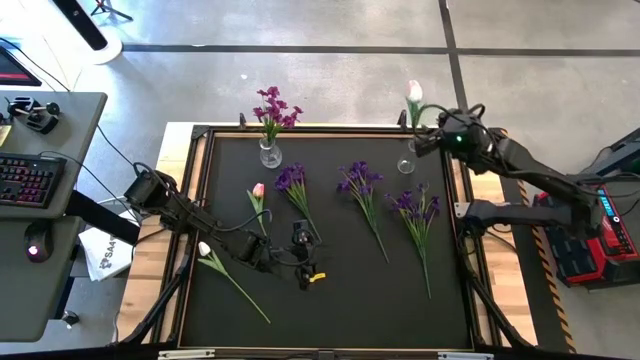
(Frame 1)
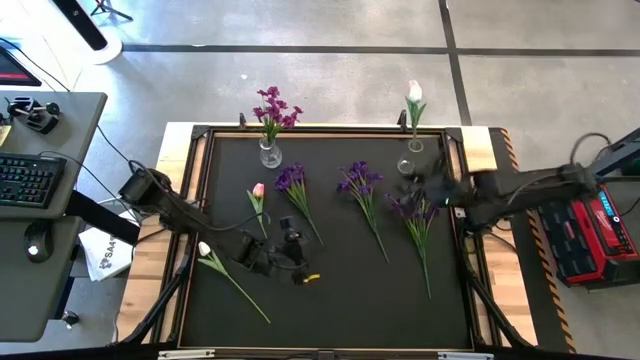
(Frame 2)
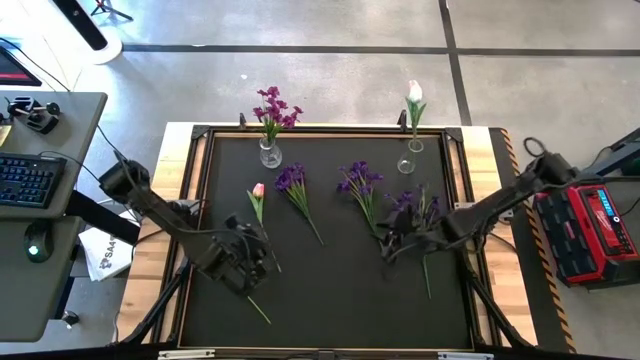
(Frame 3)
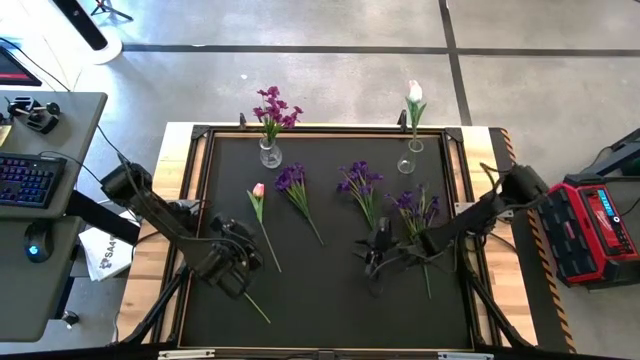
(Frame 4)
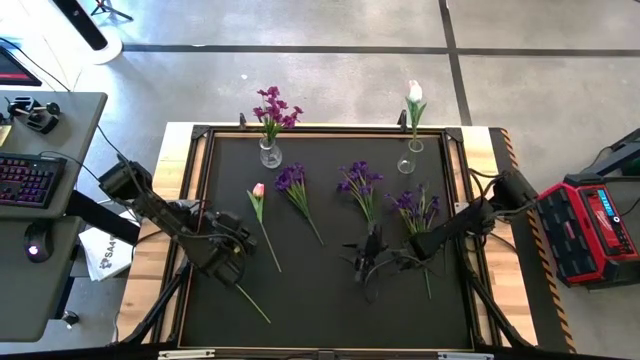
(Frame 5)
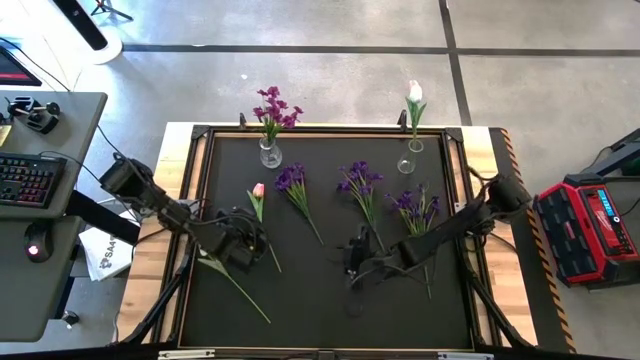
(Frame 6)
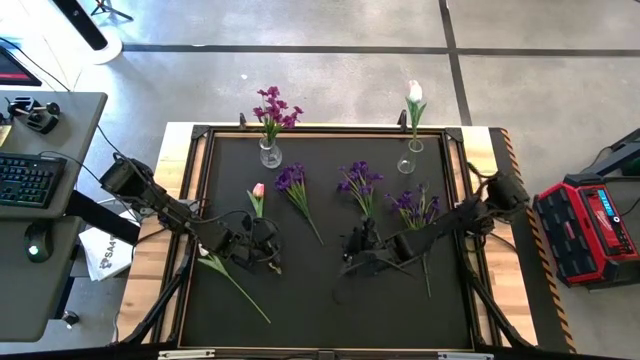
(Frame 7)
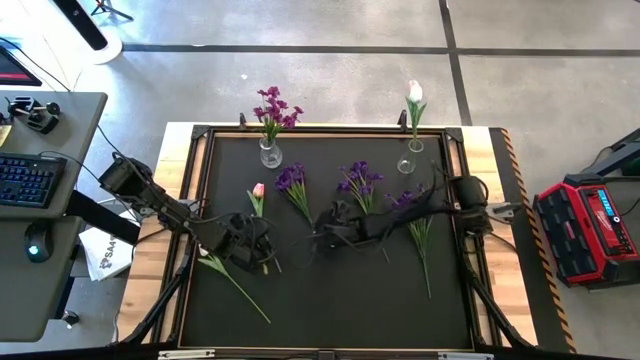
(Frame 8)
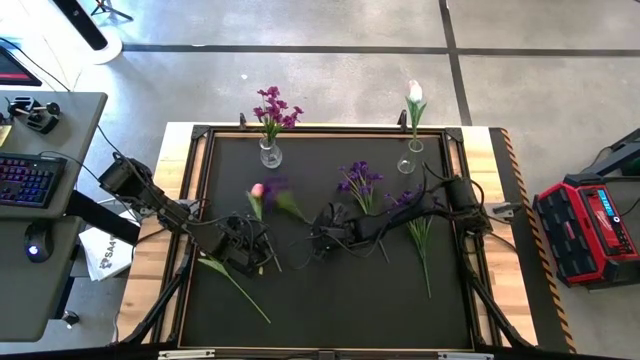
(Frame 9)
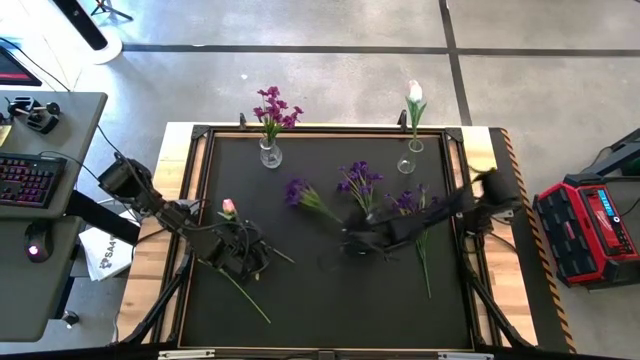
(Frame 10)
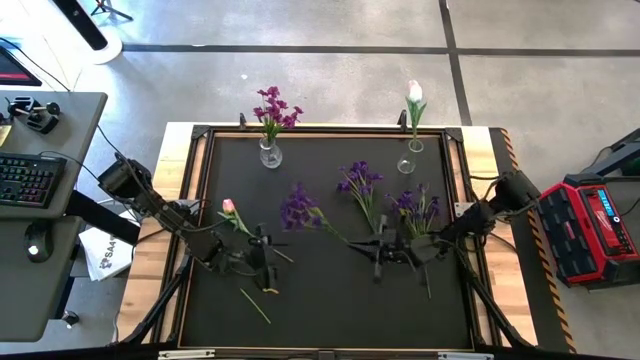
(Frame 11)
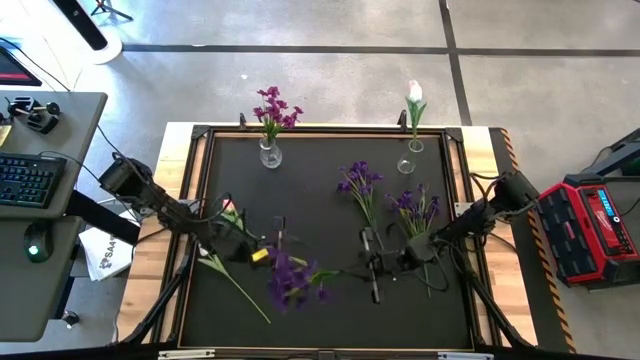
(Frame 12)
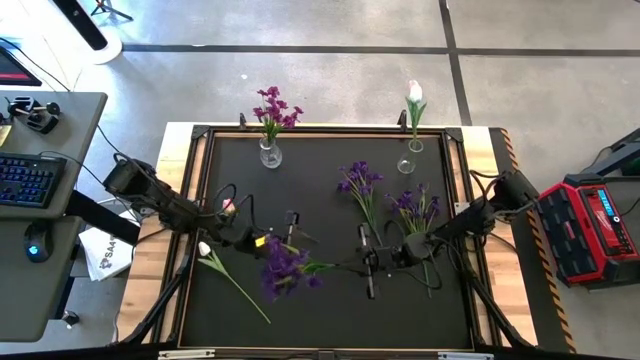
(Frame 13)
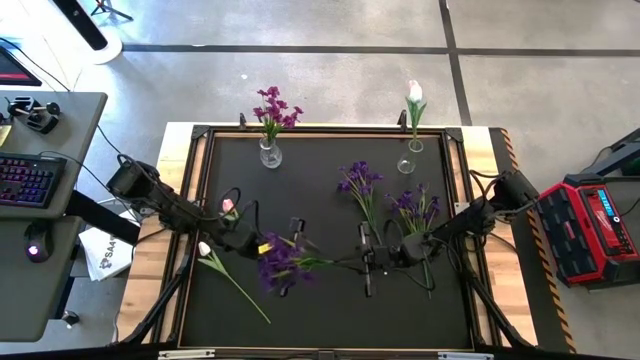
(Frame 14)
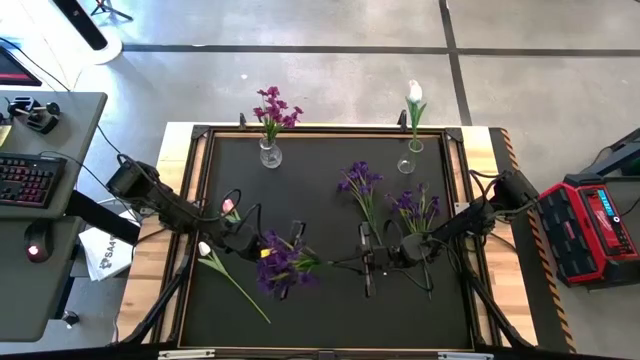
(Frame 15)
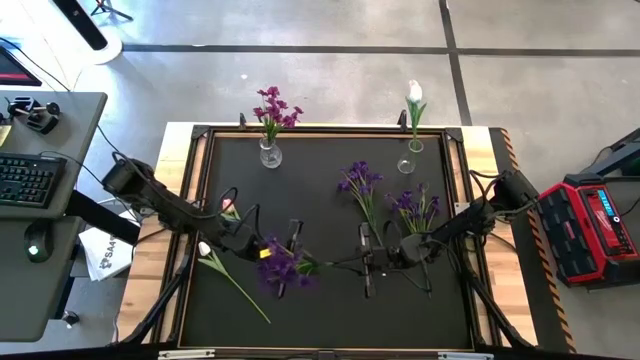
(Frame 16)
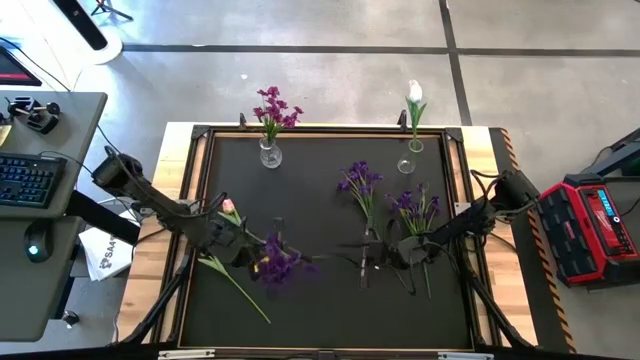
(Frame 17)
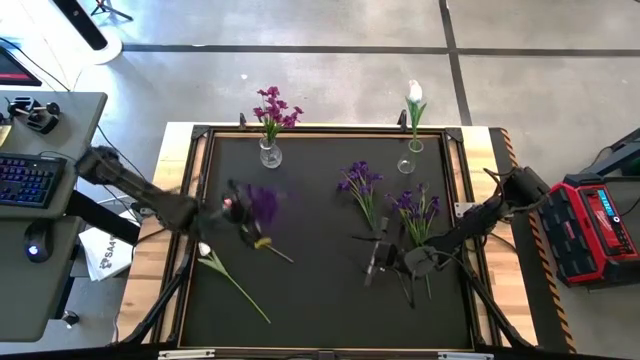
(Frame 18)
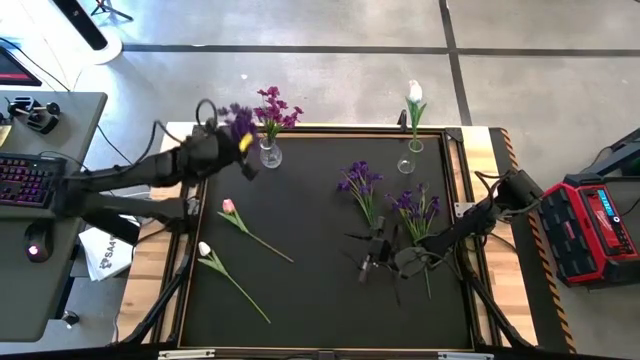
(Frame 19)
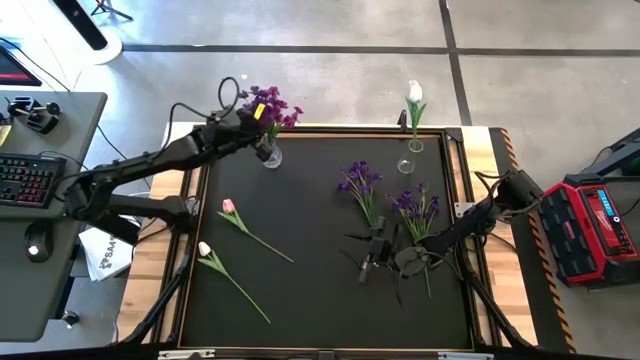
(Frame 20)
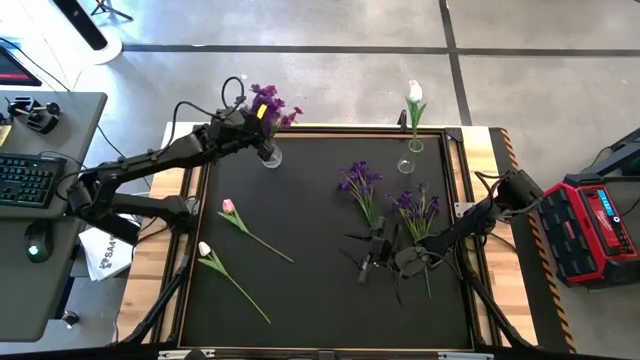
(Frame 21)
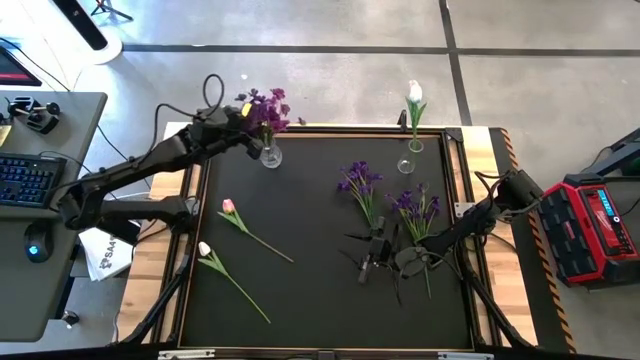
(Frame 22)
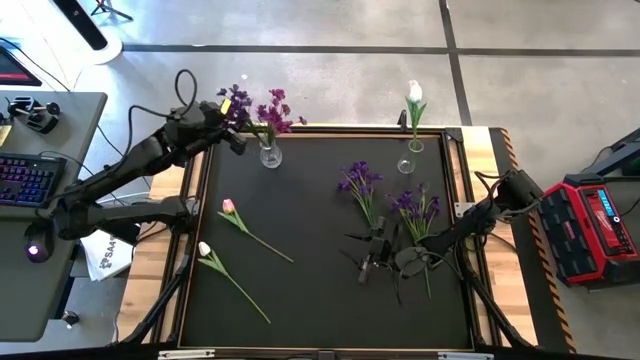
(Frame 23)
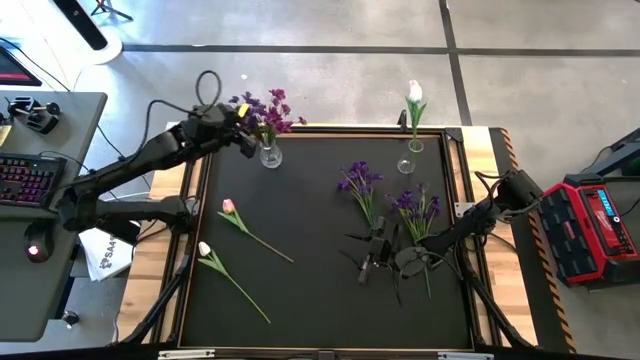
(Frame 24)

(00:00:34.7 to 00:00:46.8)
Task: Sort flowers into vase by color
Put the left violet flowers into the left transparent vase

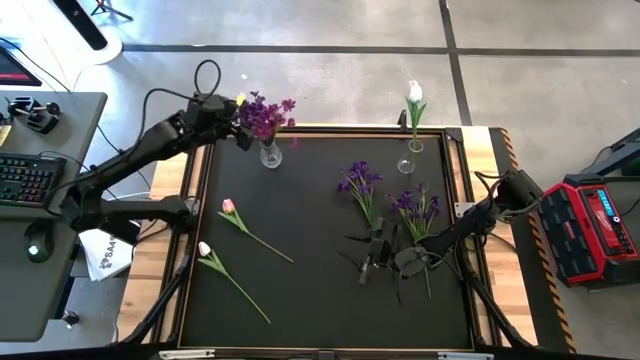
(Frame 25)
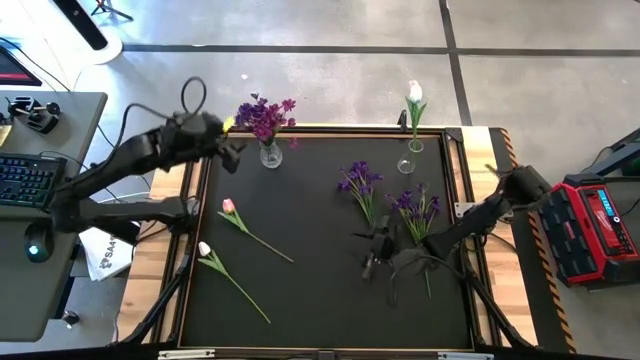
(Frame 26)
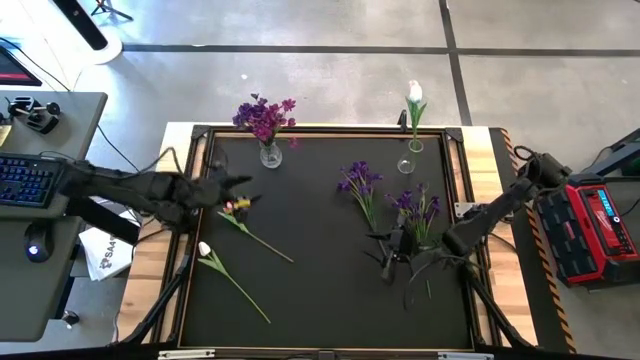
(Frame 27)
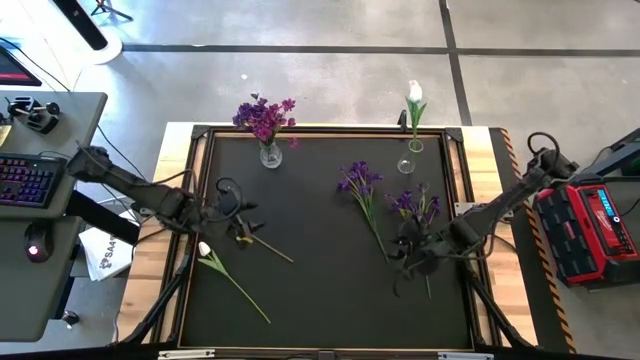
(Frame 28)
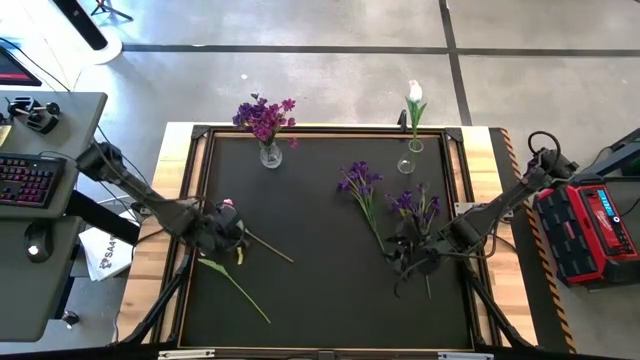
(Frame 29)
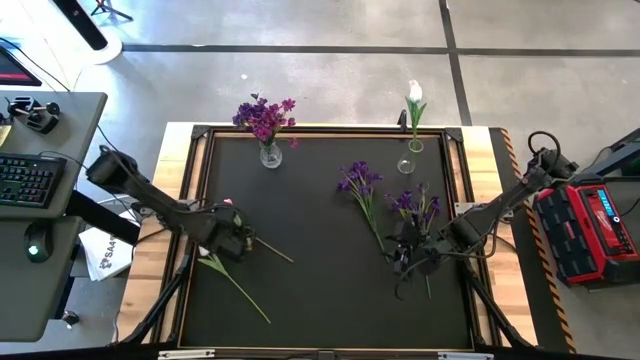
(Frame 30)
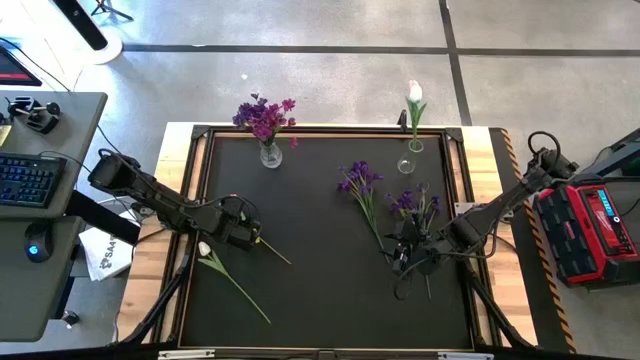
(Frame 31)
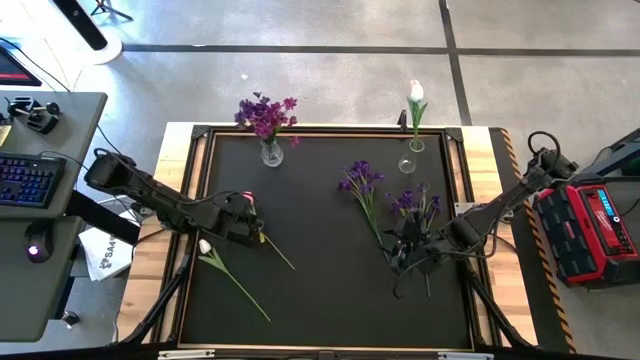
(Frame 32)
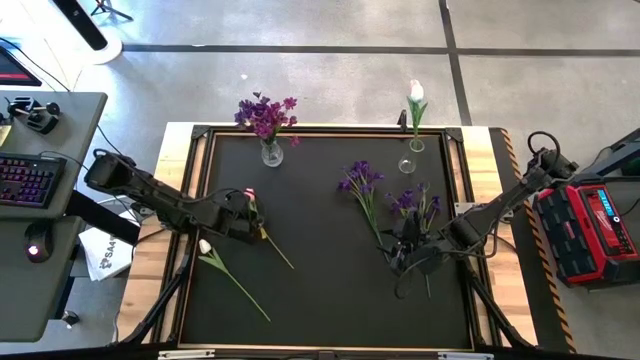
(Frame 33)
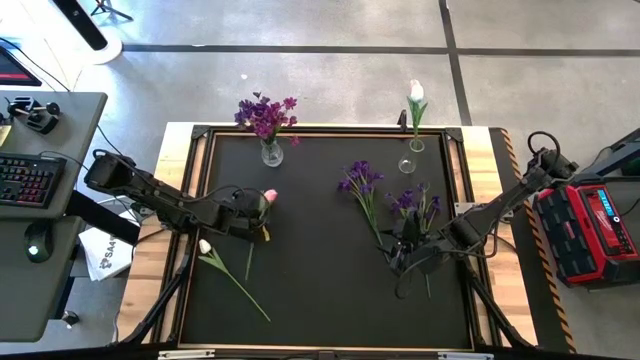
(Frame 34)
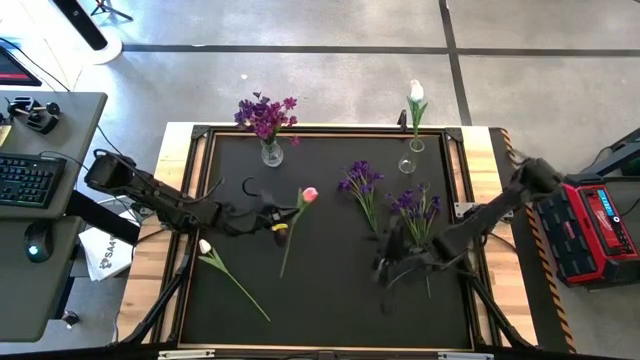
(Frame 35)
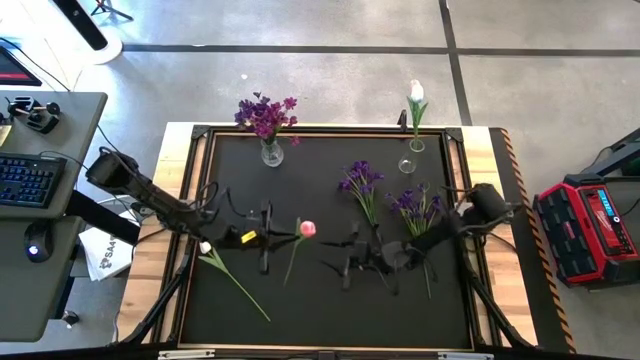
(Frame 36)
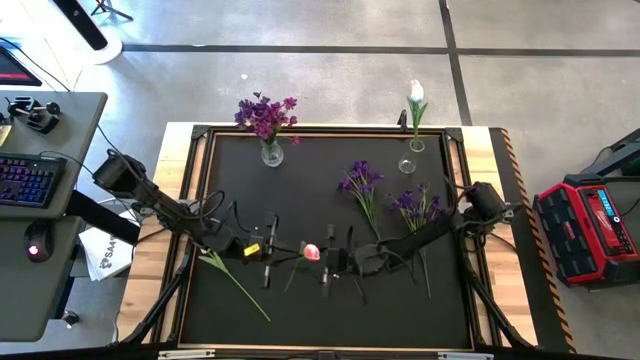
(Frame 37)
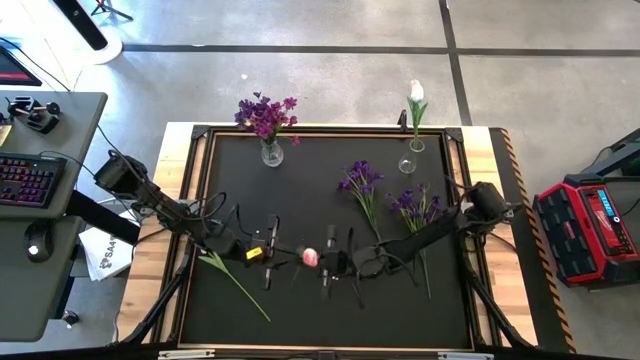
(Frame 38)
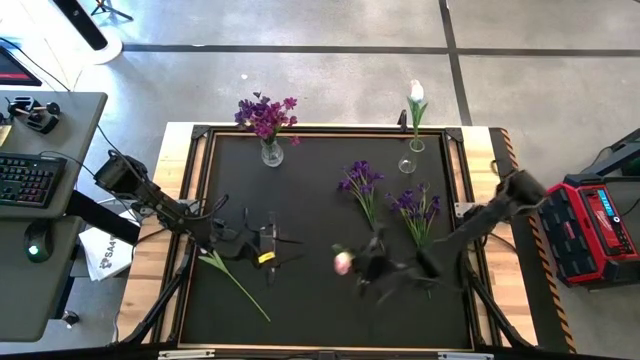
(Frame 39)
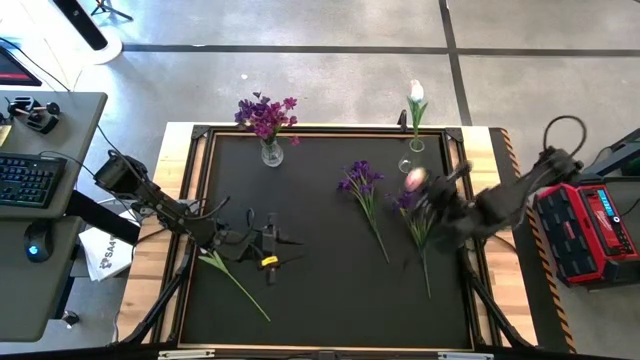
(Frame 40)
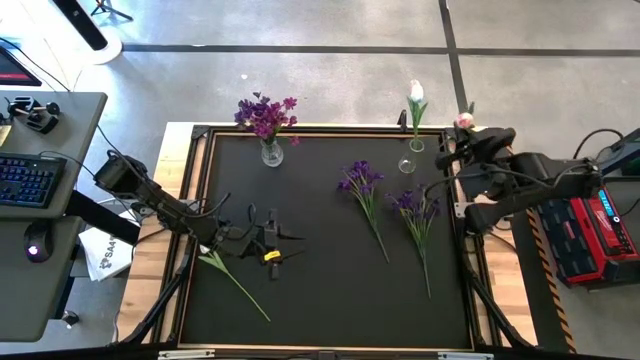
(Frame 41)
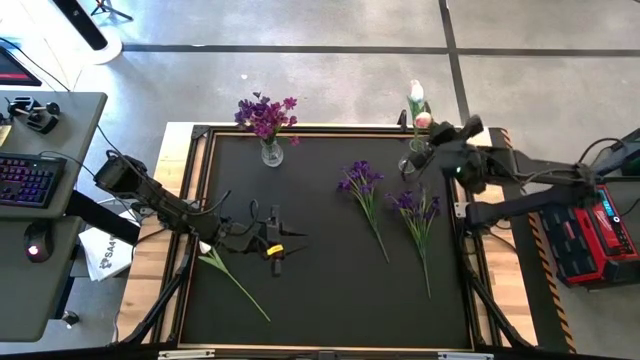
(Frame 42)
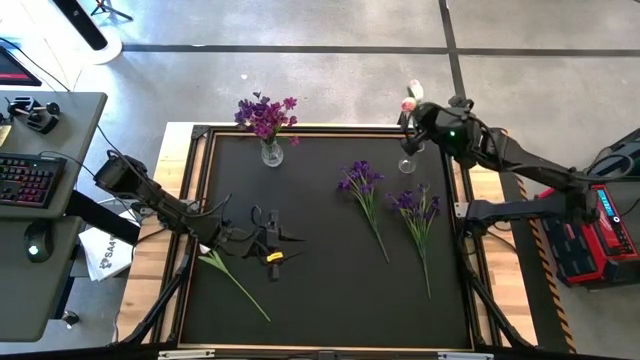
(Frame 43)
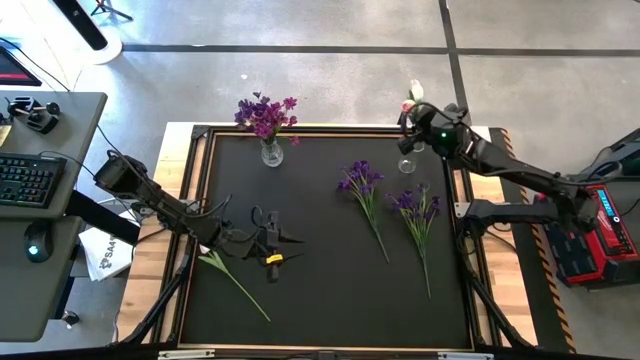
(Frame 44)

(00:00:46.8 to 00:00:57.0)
Put the pink flowers into the right transparent vase
